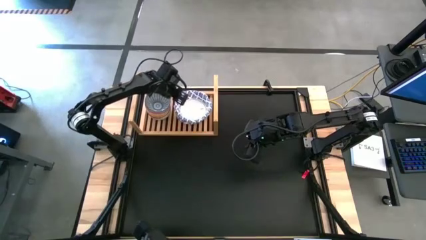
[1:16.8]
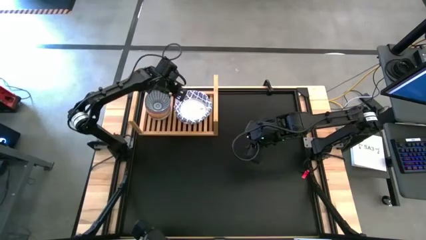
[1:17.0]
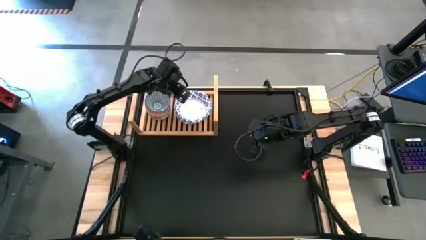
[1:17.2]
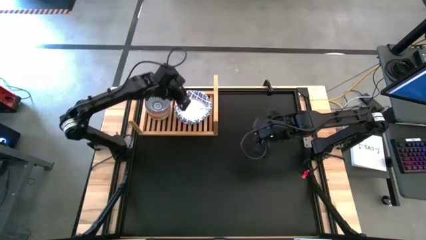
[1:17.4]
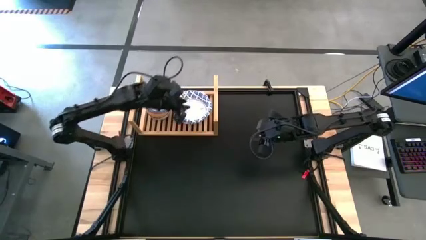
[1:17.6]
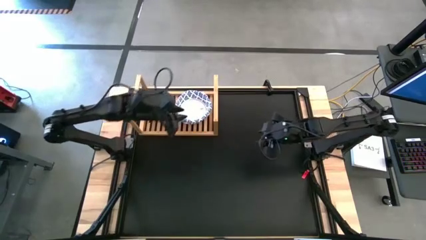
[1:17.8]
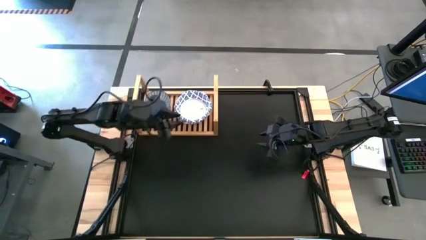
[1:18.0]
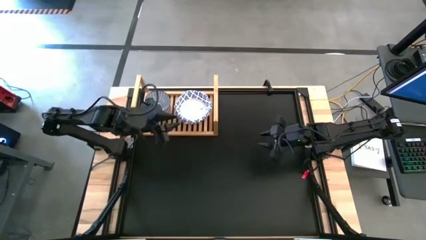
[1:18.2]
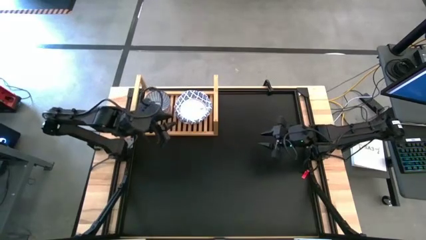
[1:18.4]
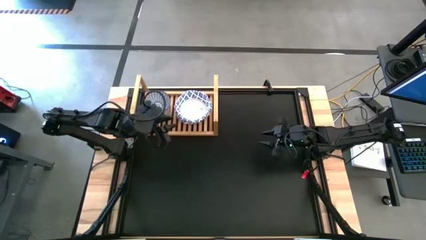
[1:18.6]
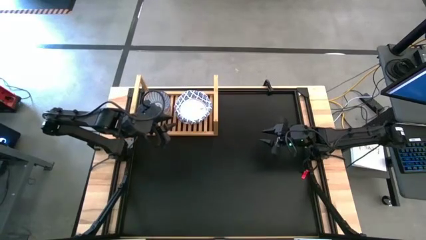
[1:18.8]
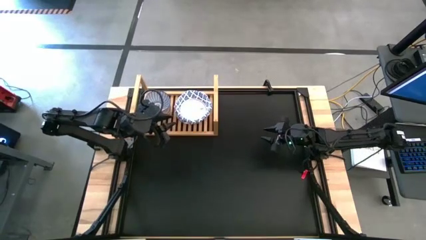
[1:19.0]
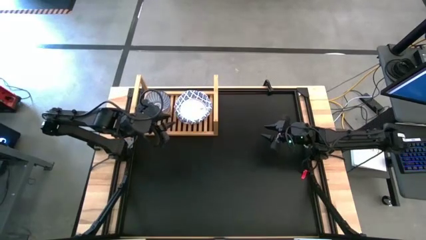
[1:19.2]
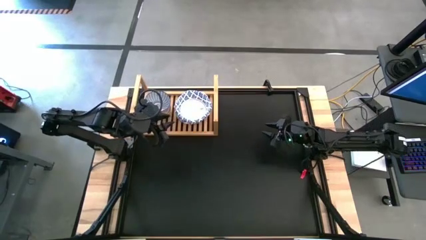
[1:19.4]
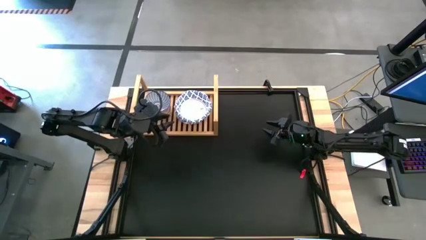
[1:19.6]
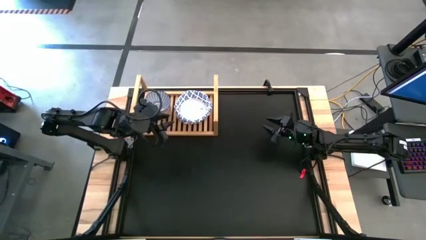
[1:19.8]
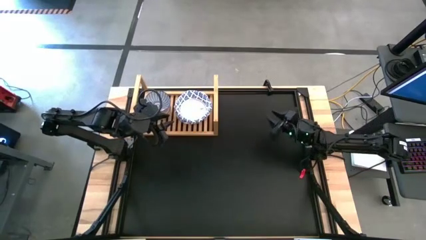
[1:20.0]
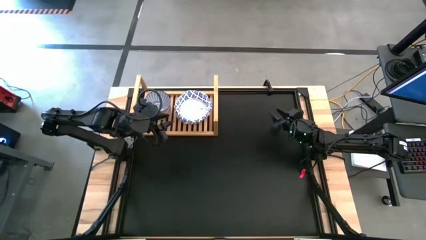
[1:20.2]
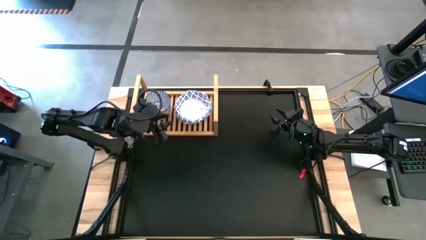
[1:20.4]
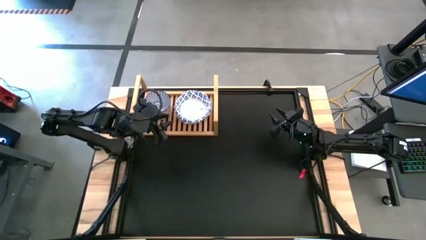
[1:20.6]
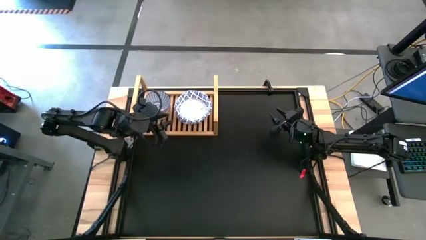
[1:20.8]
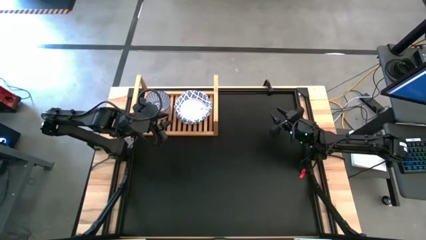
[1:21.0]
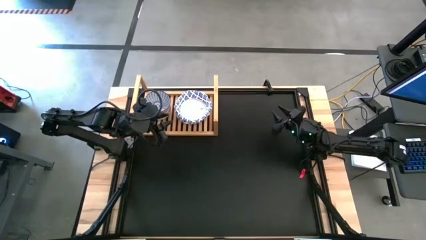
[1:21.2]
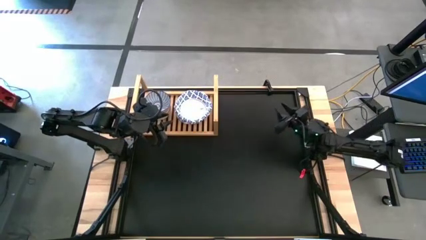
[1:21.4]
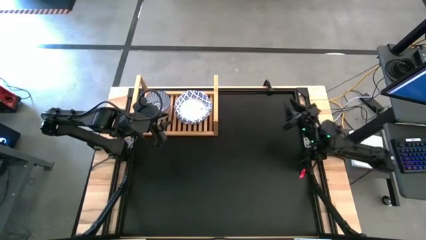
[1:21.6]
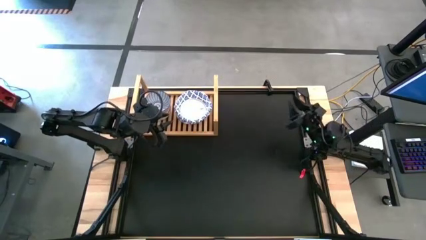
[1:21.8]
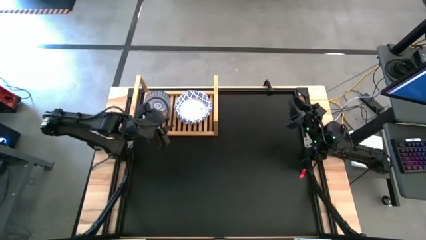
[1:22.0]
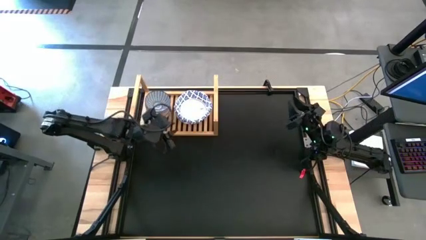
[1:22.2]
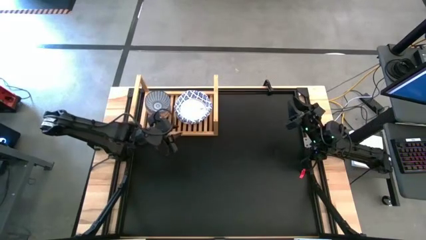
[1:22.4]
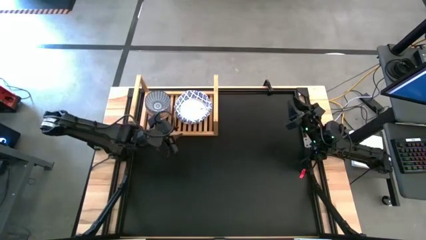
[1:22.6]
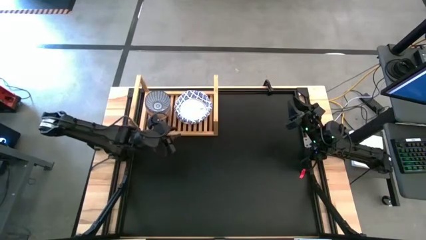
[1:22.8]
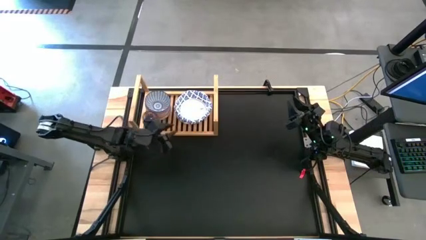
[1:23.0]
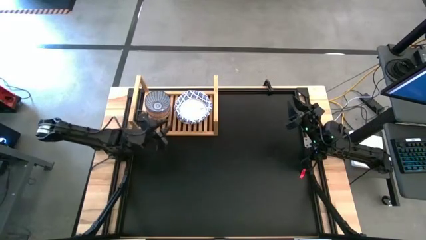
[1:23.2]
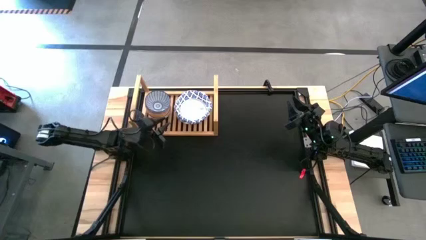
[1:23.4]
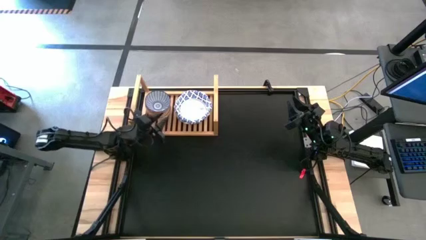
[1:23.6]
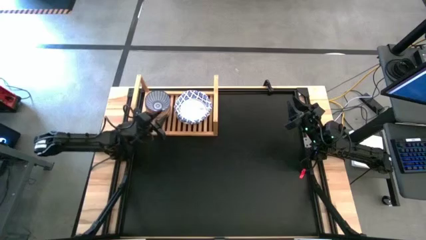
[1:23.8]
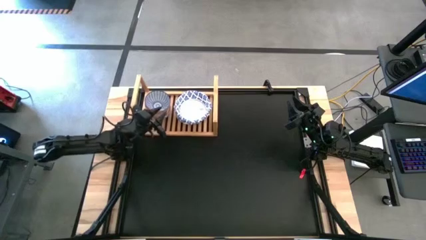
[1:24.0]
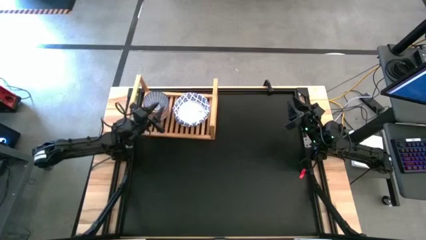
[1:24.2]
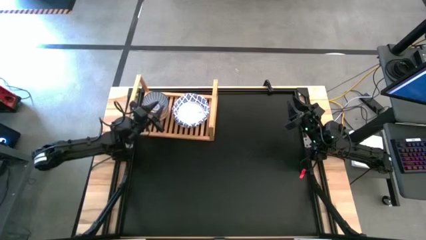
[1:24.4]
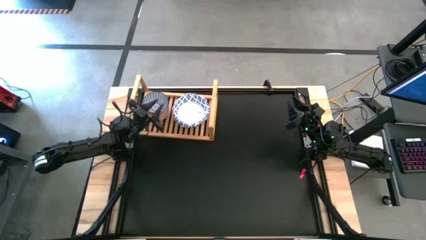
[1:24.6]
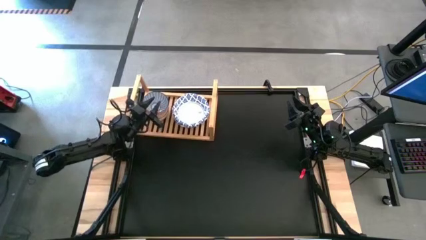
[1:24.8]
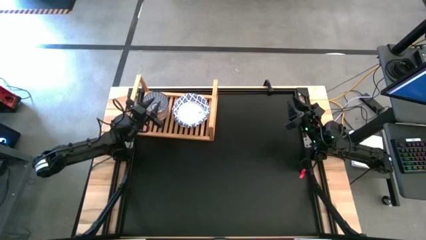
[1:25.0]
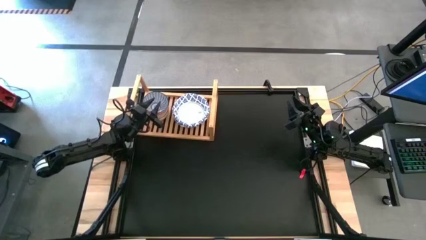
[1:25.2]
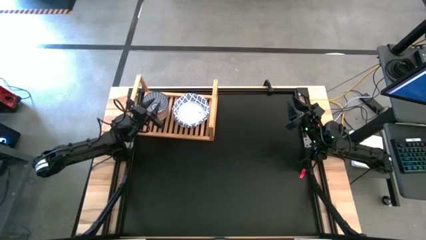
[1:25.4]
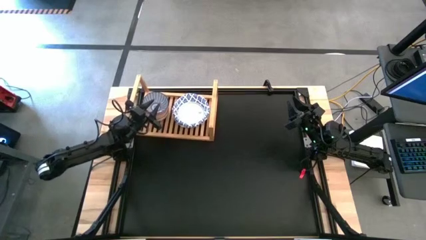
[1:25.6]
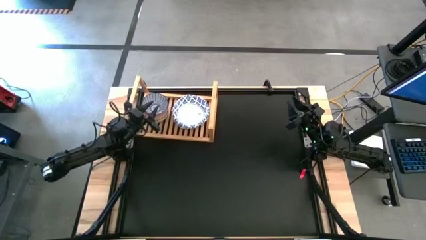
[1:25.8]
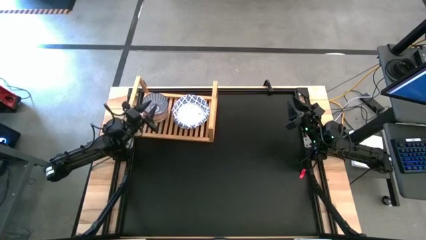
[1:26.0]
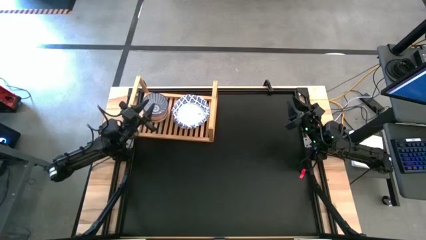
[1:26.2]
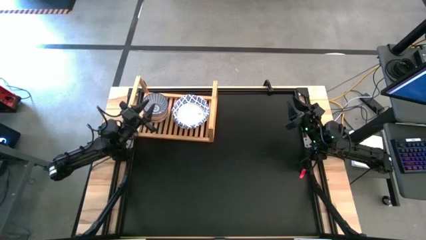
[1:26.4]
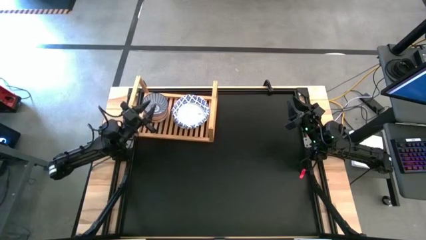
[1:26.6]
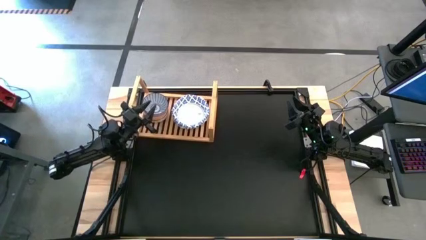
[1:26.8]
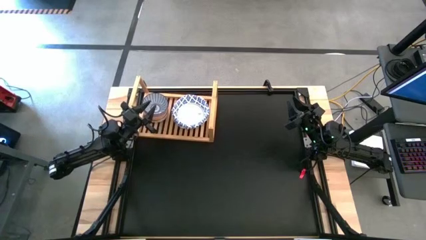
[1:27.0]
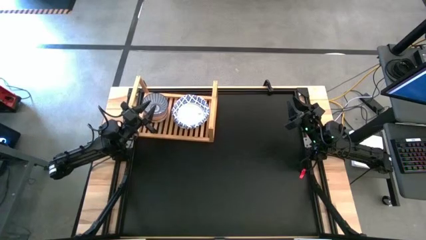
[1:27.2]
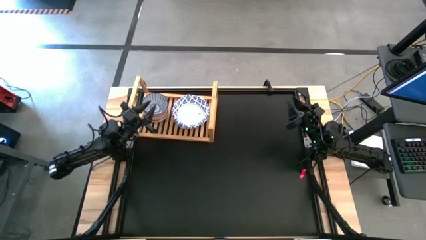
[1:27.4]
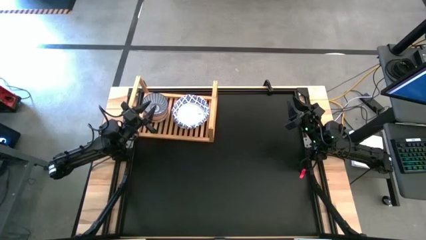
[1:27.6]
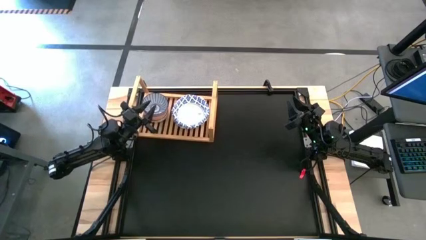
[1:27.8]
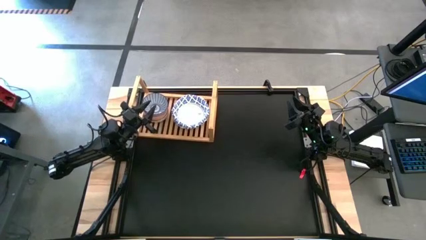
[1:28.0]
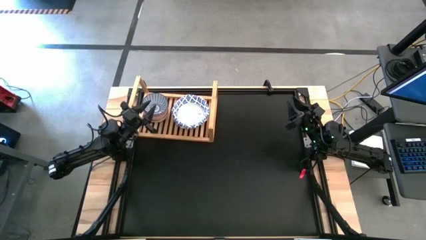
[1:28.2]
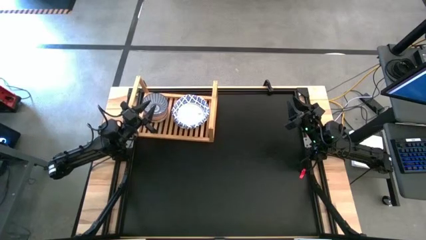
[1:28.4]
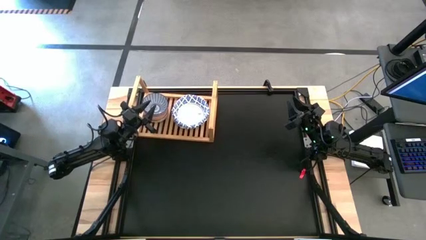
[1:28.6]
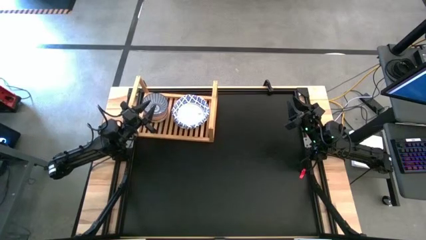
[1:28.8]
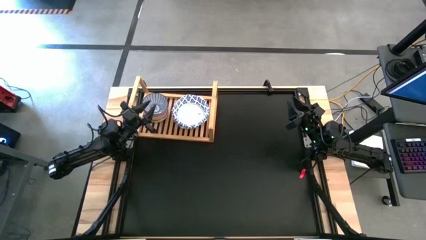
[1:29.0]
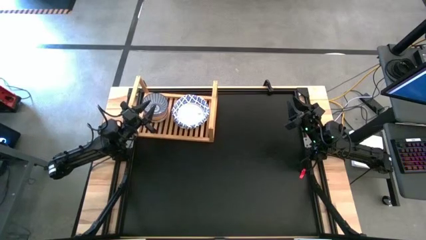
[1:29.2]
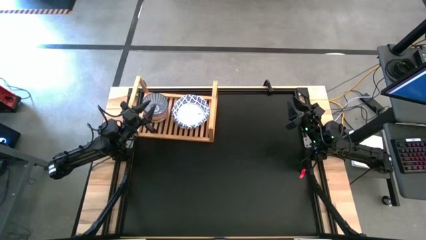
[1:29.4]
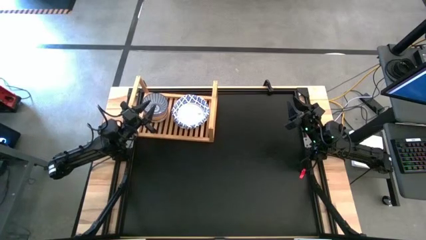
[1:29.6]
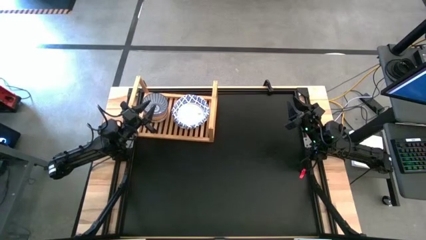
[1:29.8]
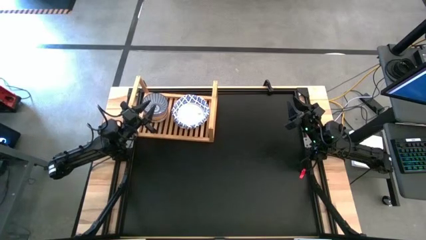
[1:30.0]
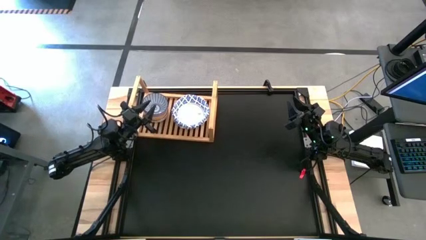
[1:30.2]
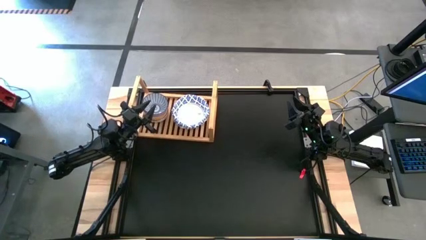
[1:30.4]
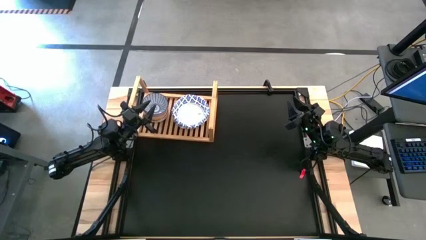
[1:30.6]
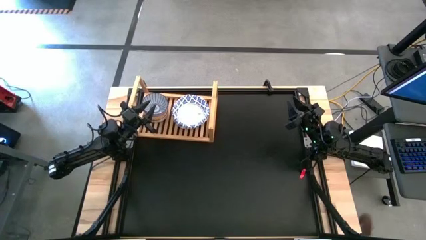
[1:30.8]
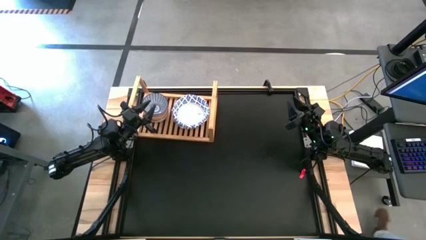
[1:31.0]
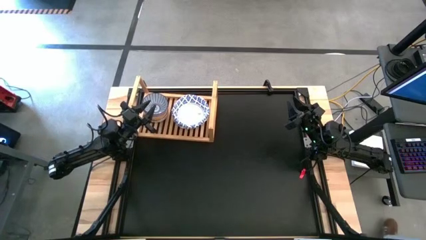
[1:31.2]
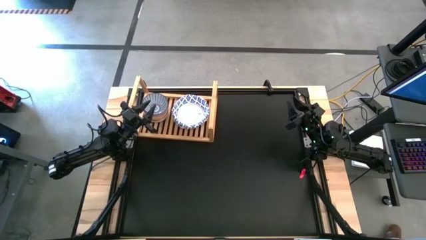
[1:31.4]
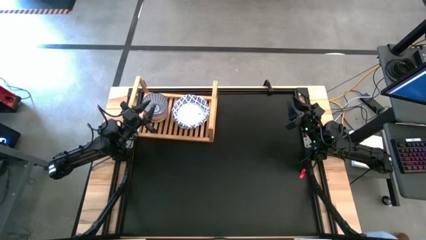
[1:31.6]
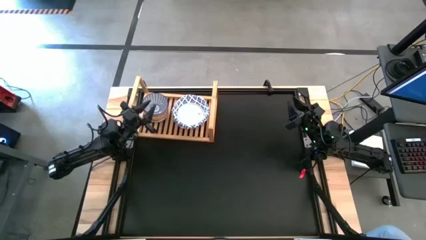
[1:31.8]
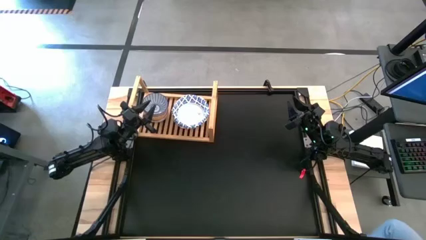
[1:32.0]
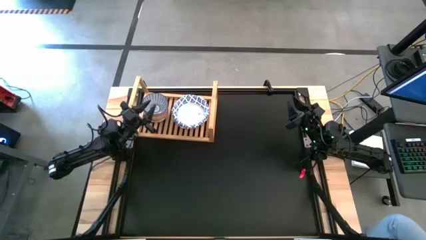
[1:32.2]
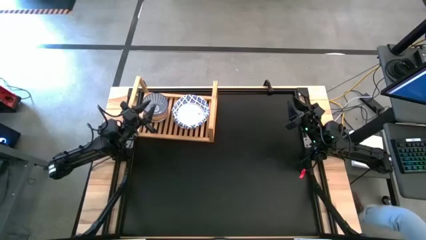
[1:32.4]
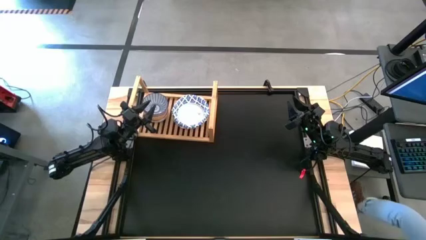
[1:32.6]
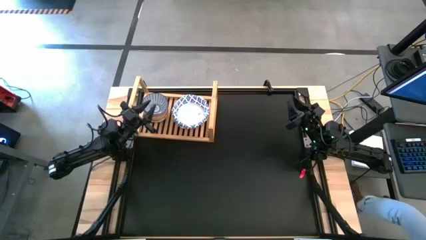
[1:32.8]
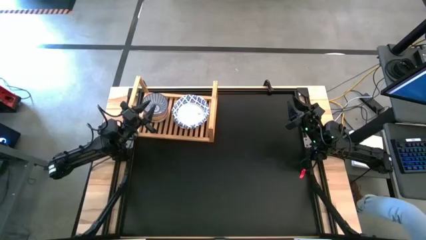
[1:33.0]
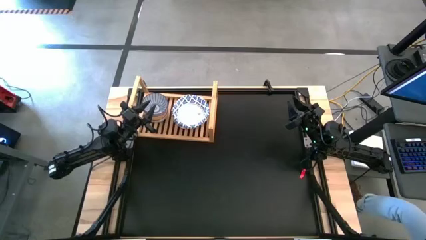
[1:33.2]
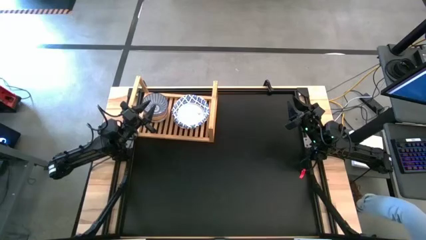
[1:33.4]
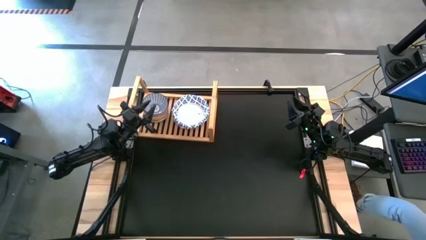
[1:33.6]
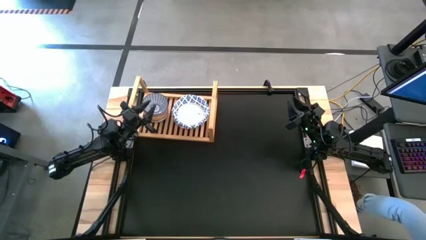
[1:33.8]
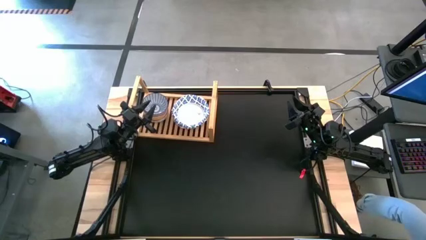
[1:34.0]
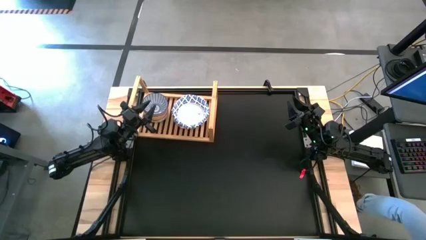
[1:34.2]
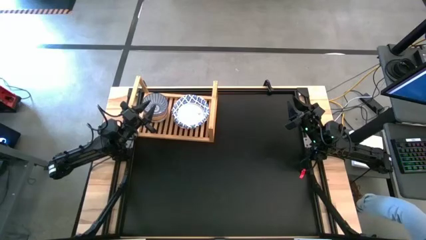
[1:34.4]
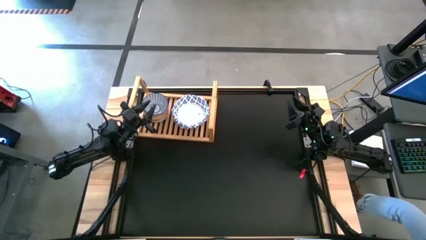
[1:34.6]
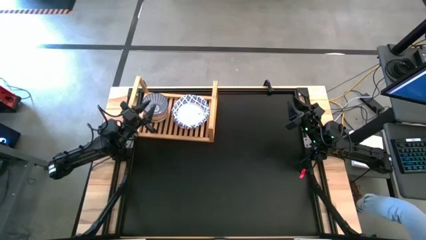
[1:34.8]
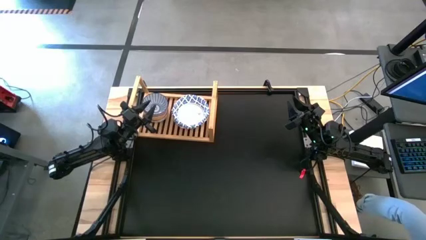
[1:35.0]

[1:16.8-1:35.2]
Task: Place and stack bowls onto a shelf
Return to Home Position
